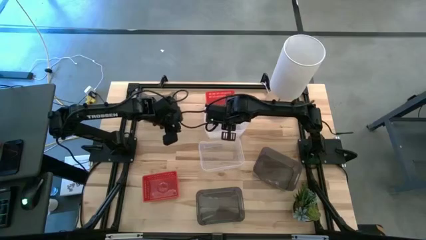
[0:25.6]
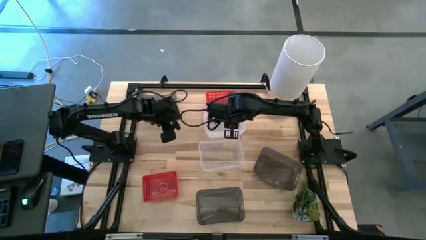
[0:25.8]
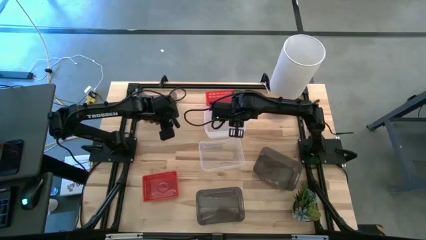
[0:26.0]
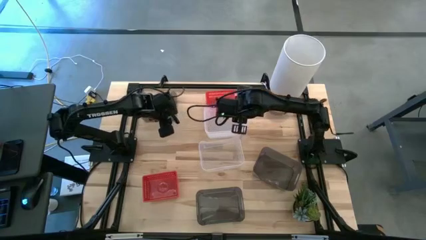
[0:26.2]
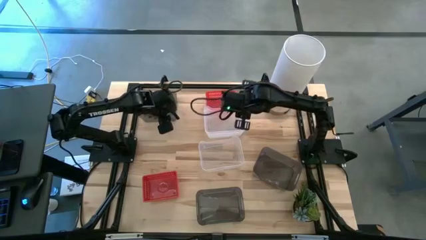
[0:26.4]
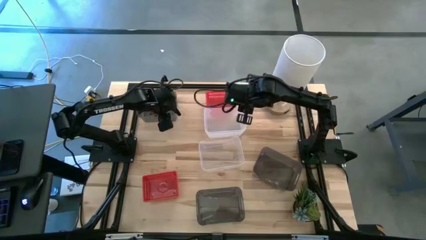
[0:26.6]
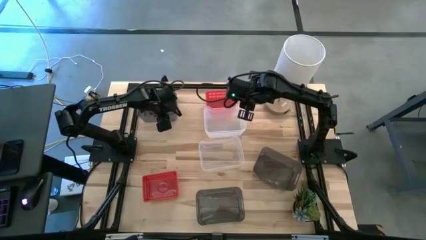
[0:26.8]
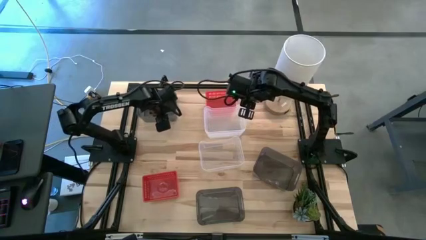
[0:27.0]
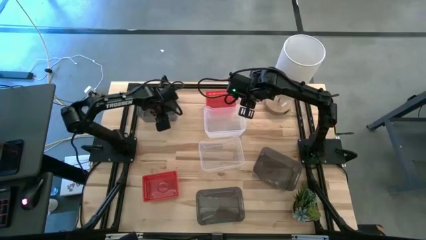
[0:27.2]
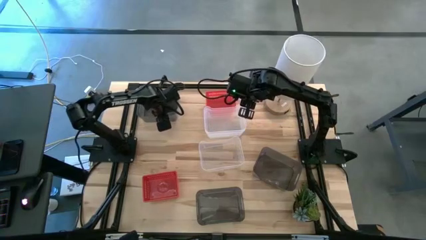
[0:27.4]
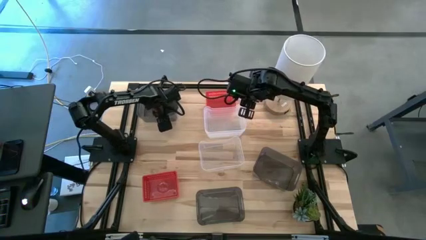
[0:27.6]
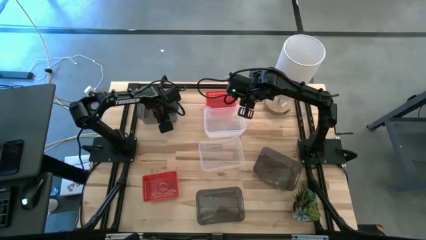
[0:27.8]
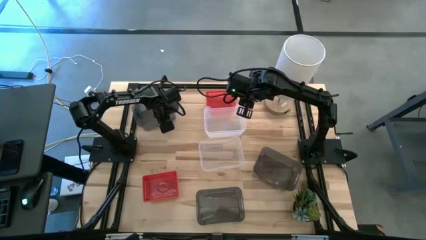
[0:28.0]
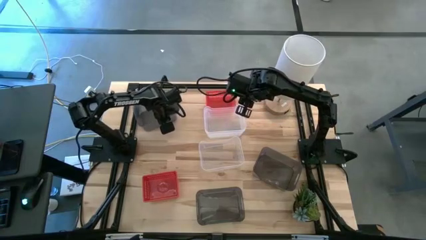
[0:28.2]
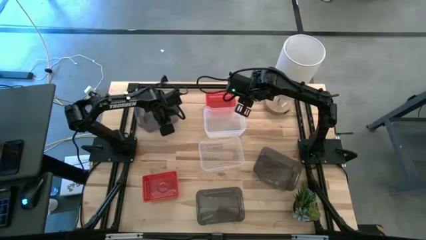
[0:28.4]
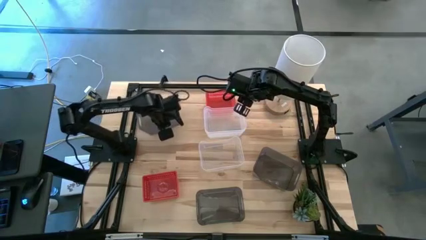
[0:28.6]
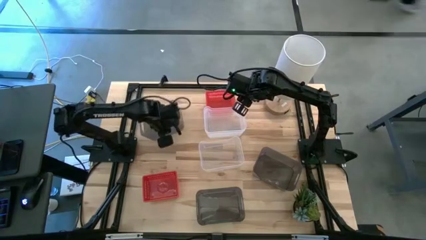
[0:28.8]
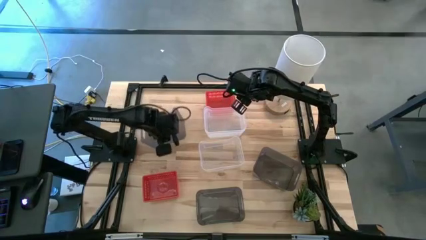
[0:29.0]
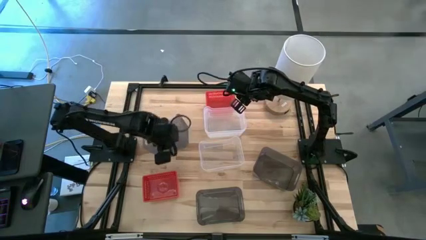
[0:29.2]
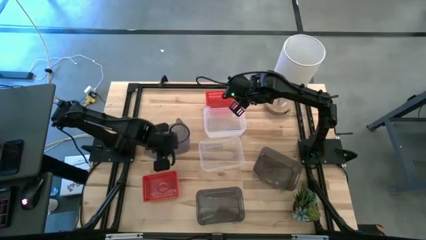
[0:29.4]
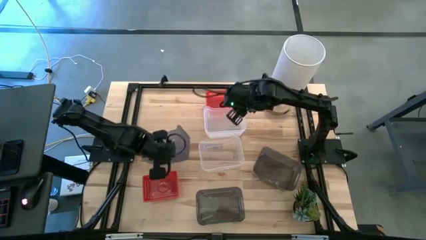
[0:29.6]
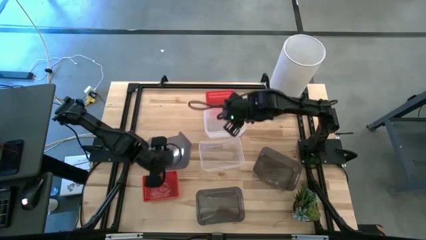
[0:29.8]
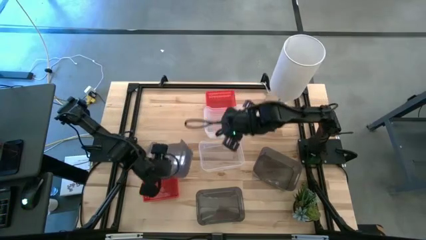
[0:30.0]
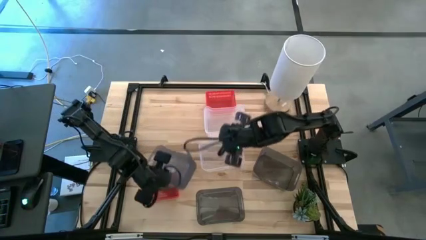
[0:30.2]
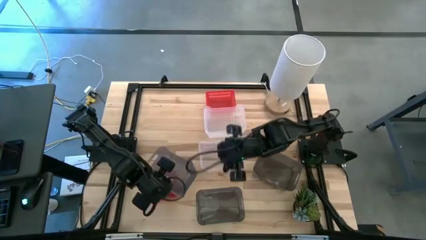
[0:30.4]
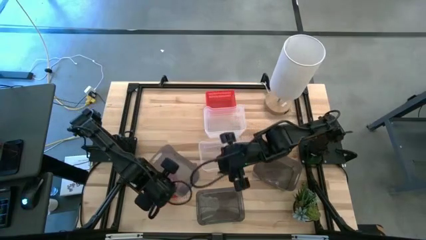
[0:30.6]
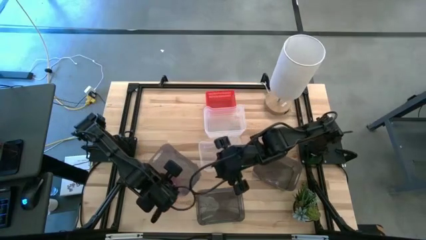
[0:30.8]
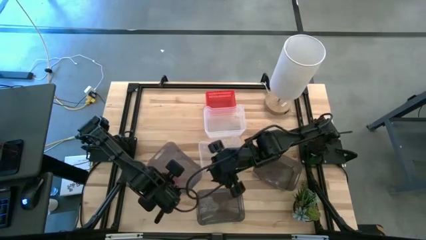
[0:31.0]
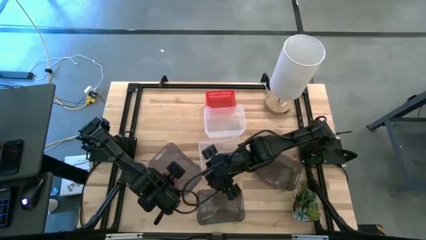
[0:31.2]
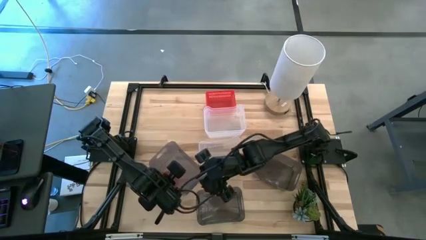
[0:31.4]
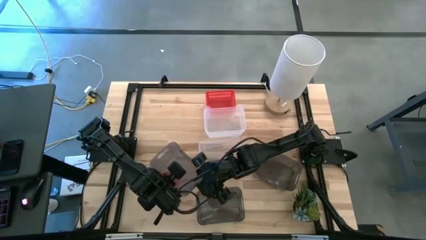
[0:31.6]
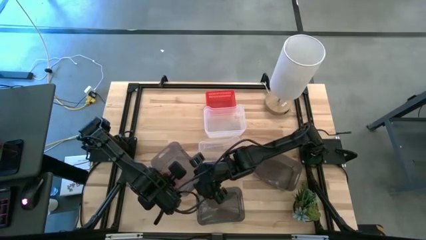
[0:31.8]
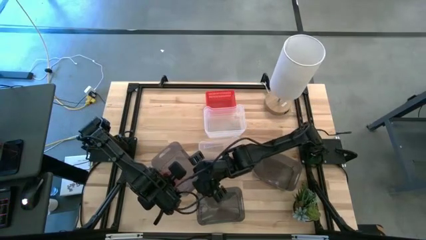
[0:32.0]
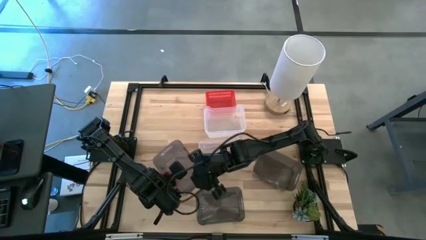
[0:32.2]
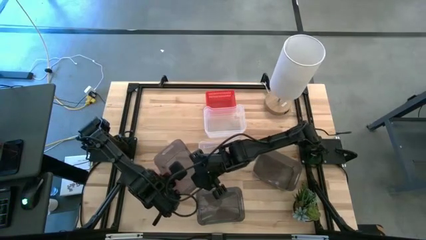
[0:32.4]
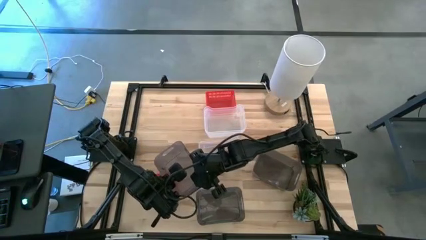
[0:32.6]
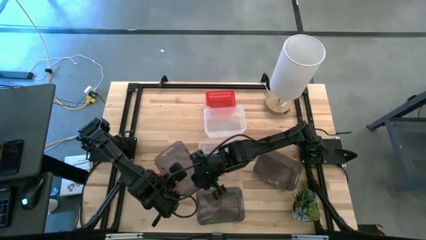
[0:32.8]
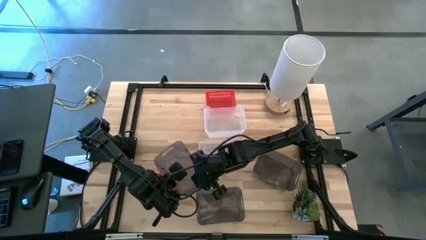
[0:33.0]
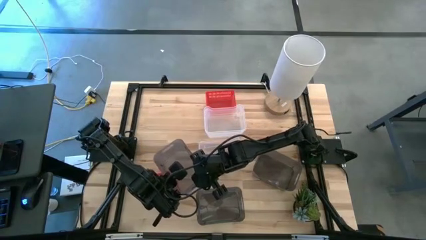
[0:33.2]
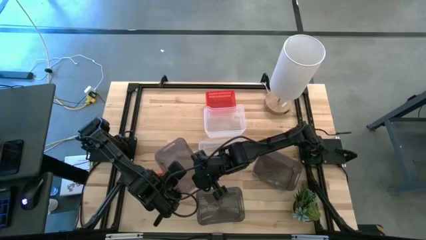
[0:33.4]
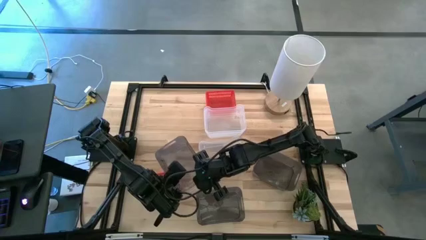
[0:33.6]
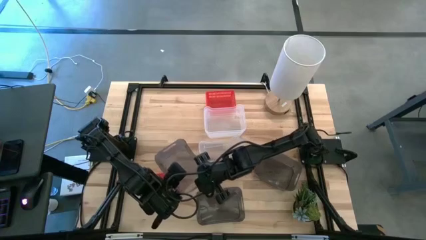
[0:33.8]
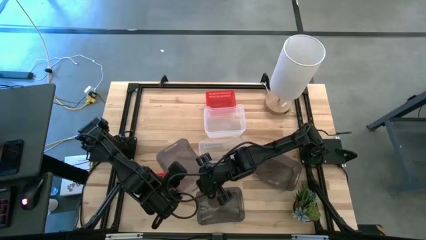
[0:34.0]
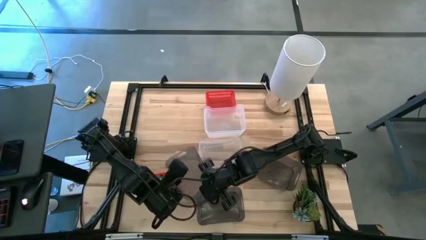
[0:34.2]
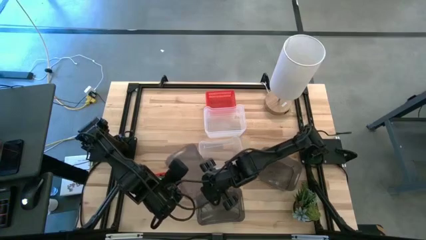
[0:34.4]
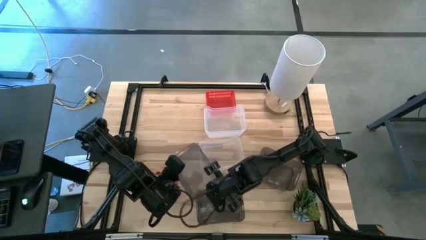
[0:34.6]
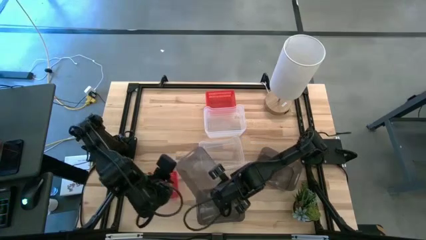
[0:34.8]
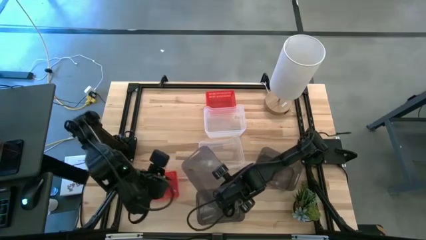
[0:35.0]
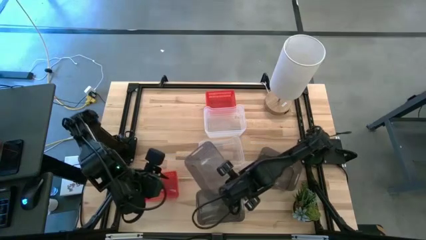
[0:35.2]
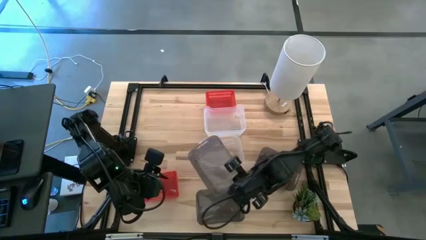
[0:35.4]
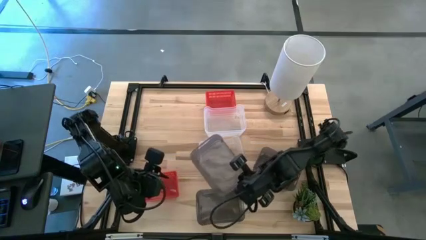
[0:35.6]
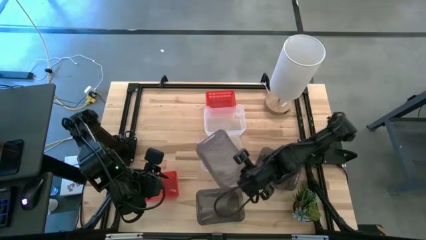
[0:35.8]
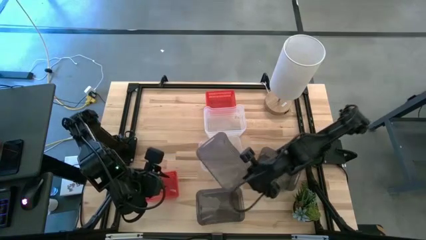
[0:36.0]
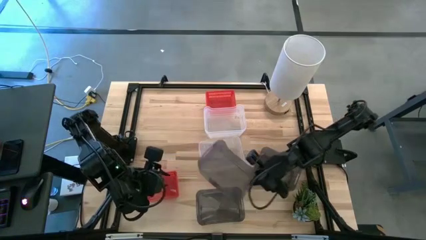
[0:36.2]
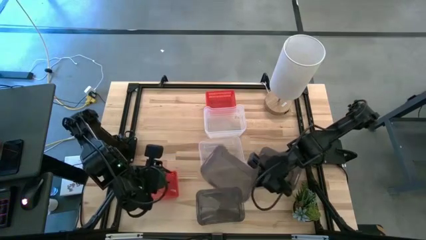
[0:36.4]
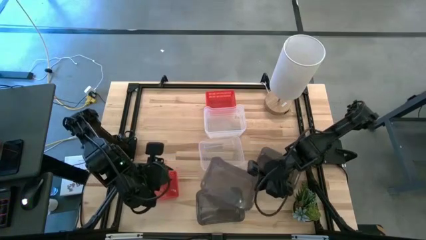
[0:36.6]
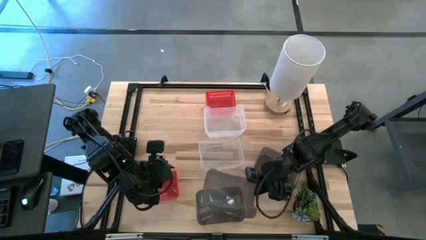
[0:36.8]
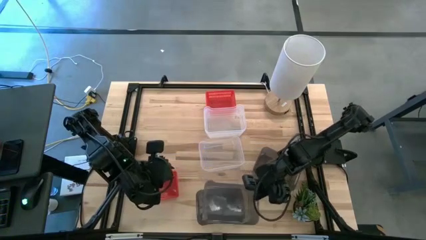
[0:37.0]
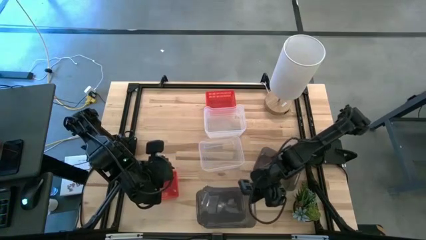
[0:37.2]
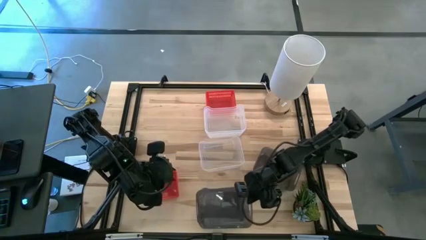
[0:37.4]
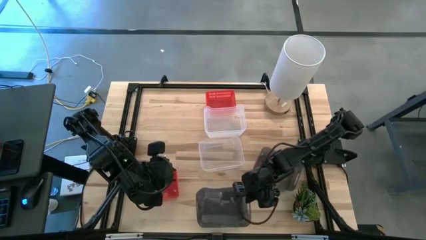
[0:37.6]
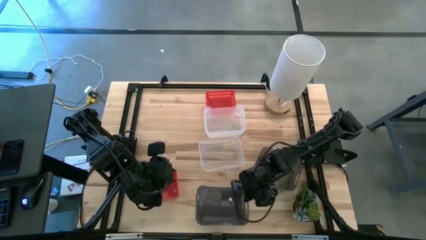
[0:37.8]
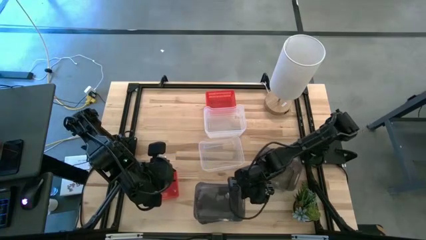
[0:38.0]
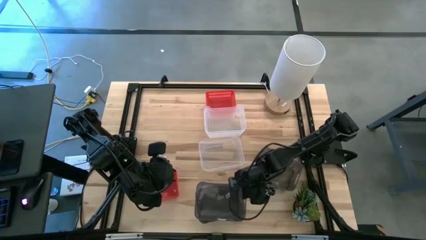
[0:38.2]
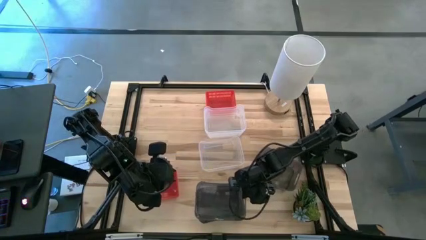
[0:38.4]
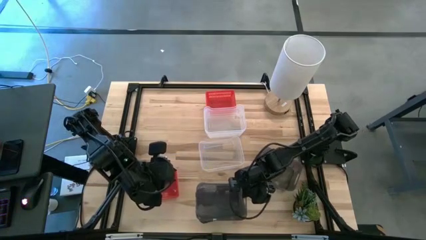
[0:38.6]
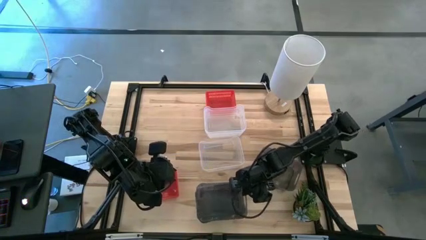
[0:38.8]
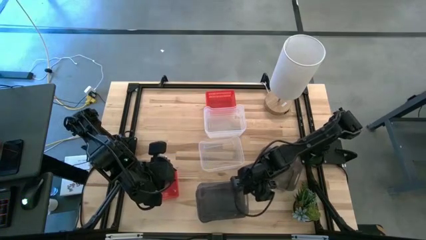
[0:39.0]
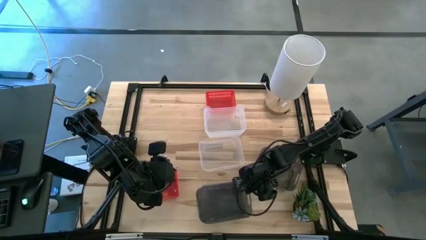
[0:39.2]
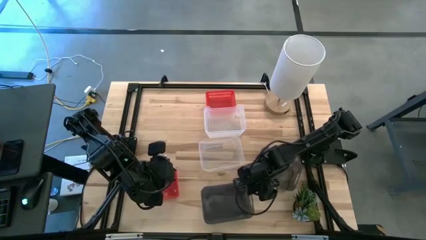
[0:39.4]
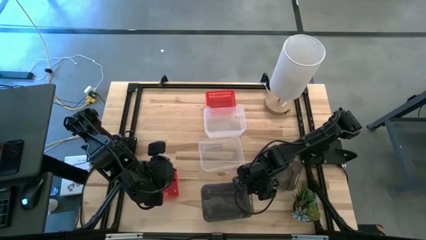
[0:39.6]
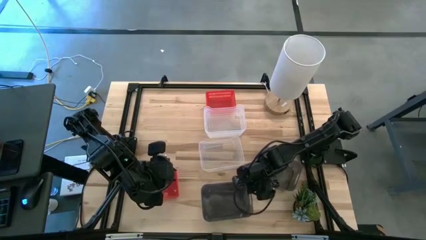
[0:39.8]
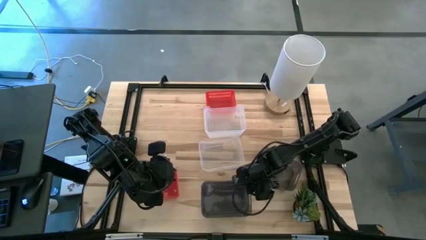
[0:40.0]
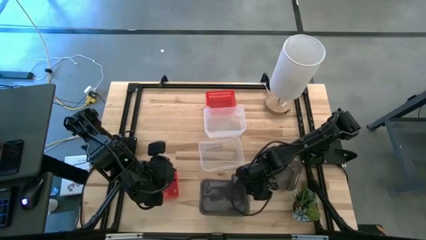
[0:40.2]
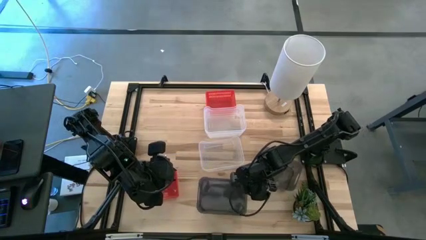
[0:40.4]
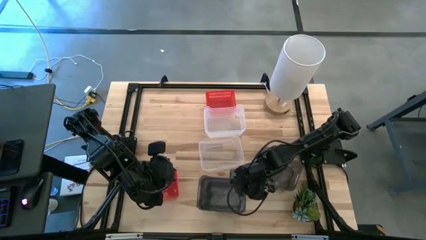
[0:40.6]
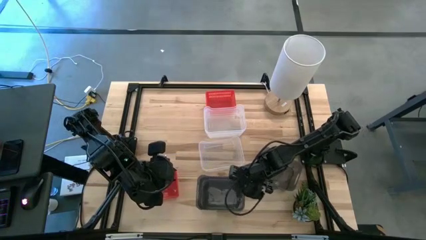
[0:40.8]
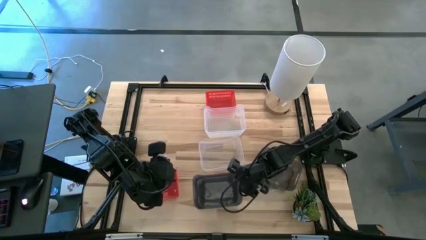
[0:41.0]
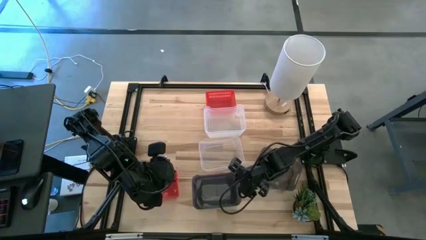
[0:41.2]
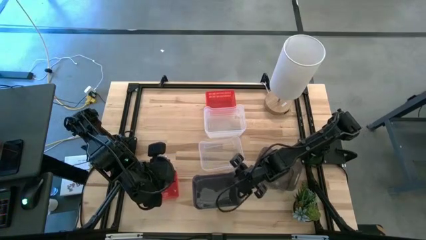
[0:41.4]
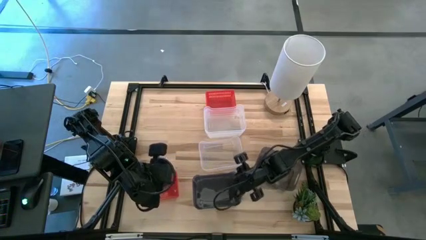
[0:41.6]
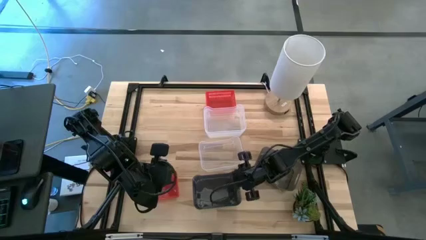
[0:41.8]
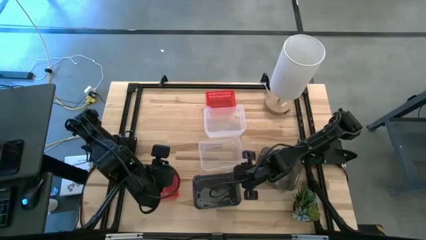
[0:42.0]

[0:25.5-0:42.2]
Stack the left black transparent bin on the bottom black transparent bin
